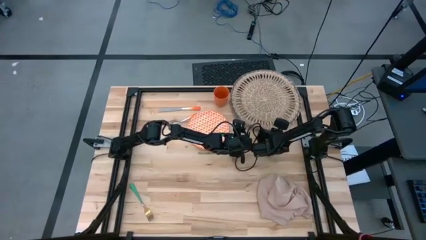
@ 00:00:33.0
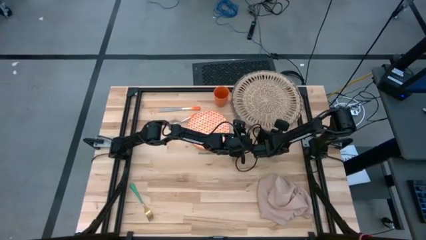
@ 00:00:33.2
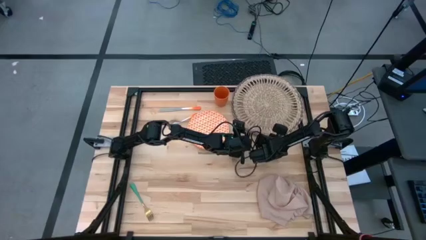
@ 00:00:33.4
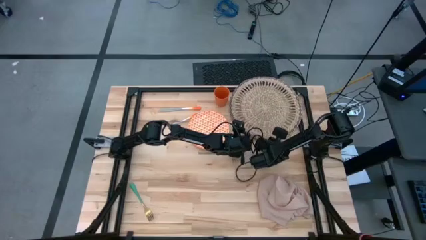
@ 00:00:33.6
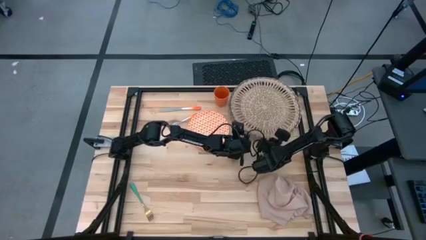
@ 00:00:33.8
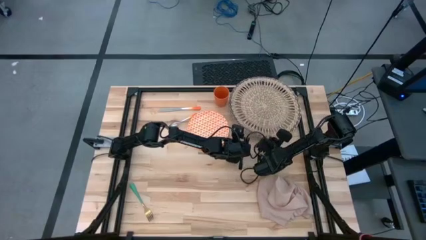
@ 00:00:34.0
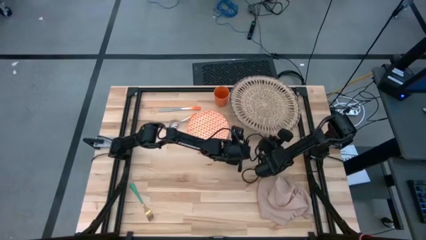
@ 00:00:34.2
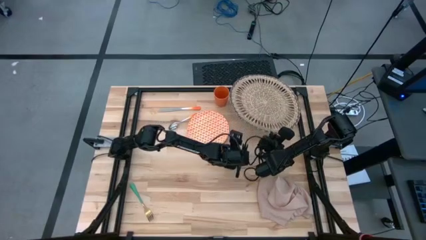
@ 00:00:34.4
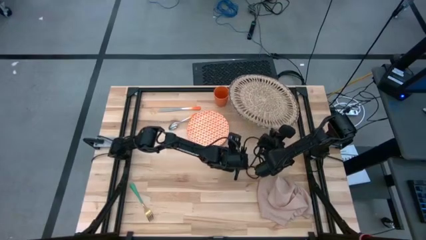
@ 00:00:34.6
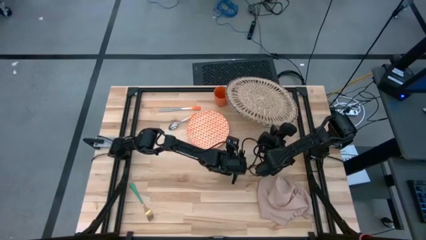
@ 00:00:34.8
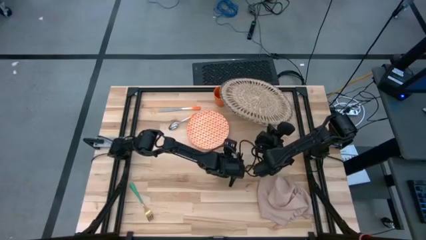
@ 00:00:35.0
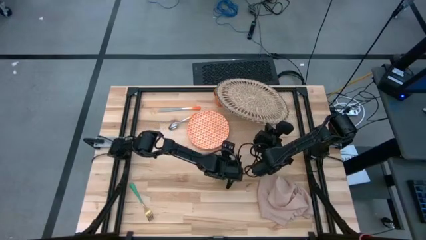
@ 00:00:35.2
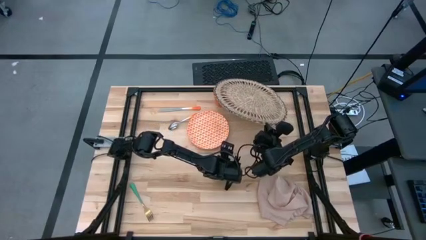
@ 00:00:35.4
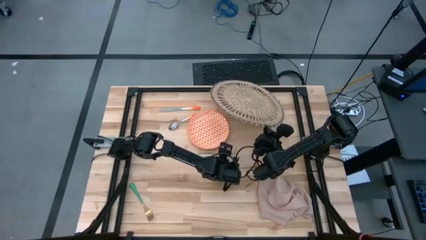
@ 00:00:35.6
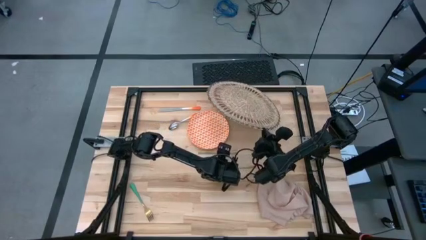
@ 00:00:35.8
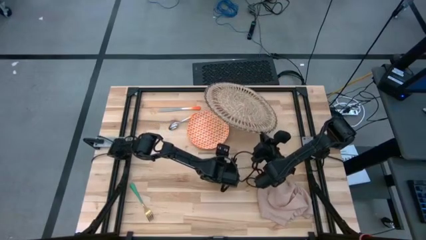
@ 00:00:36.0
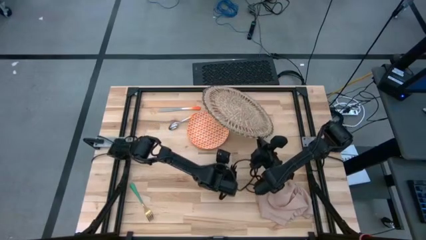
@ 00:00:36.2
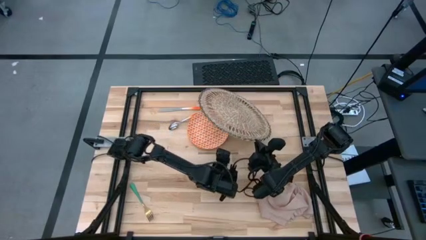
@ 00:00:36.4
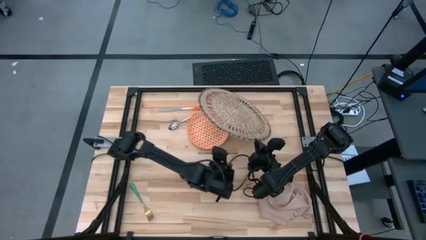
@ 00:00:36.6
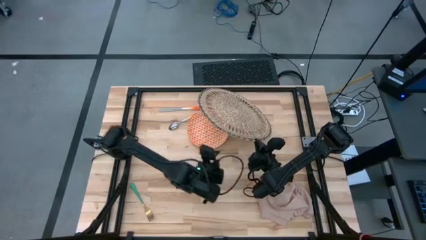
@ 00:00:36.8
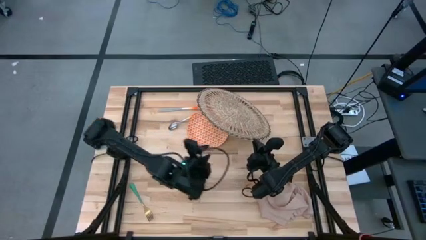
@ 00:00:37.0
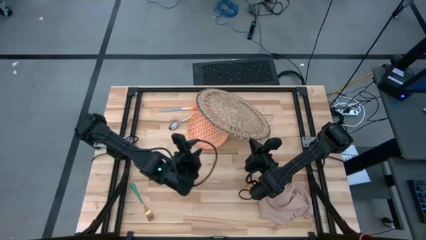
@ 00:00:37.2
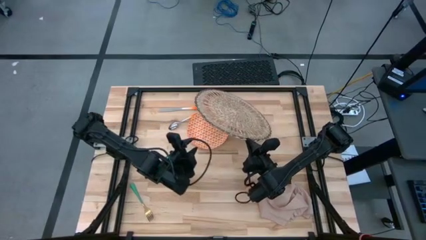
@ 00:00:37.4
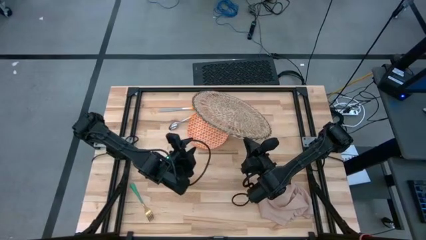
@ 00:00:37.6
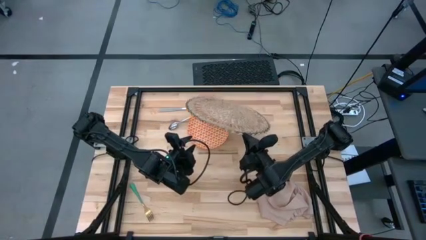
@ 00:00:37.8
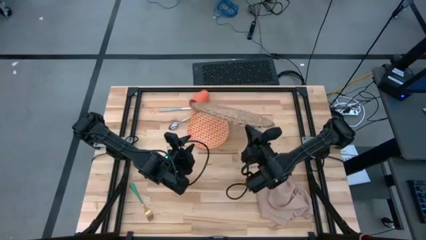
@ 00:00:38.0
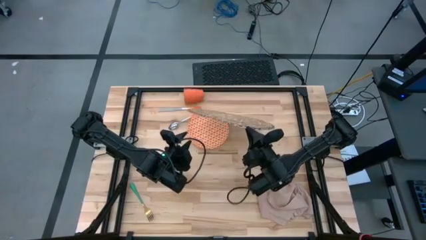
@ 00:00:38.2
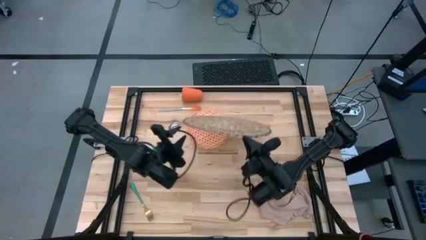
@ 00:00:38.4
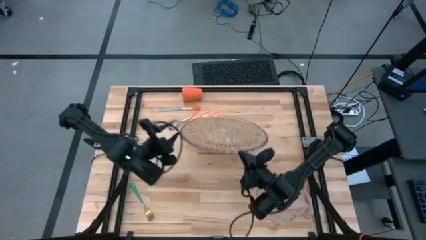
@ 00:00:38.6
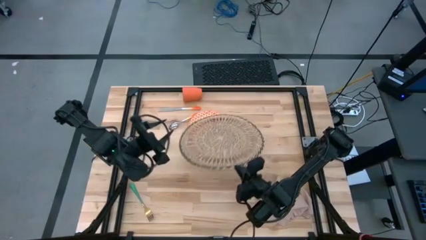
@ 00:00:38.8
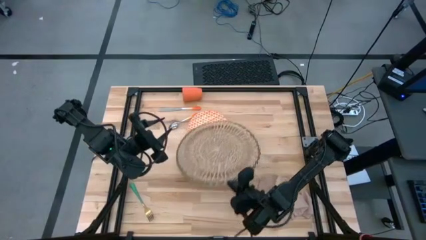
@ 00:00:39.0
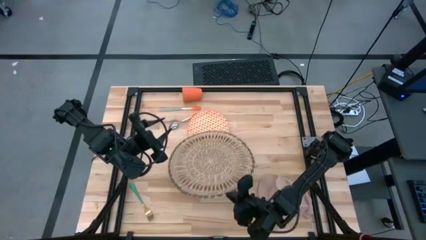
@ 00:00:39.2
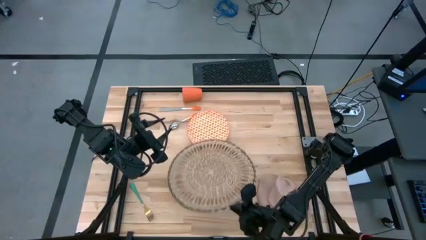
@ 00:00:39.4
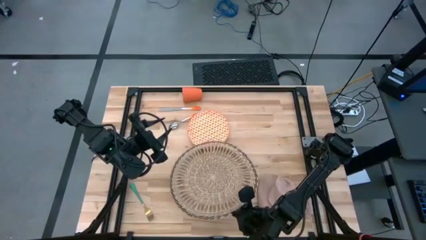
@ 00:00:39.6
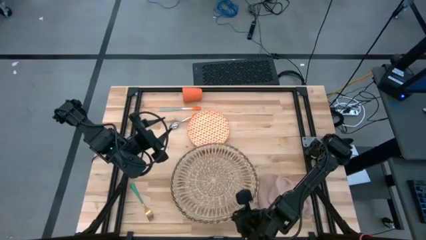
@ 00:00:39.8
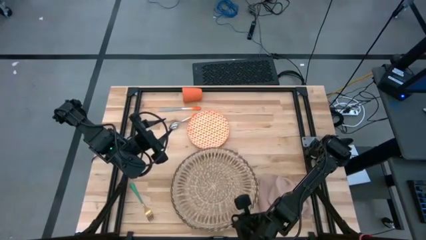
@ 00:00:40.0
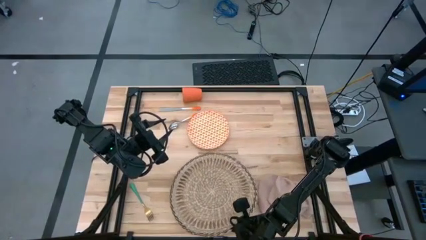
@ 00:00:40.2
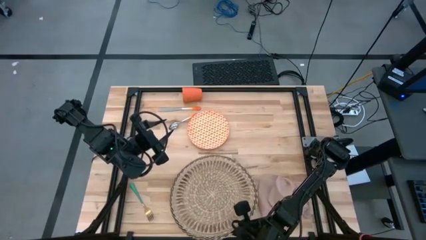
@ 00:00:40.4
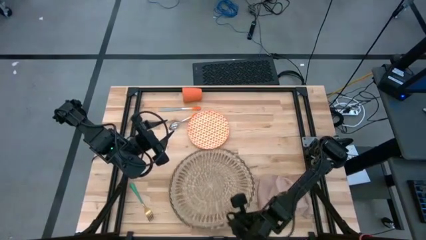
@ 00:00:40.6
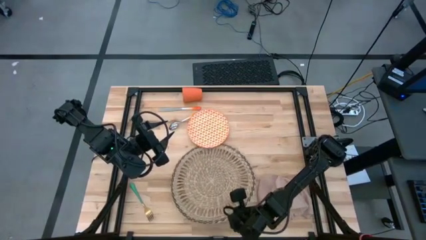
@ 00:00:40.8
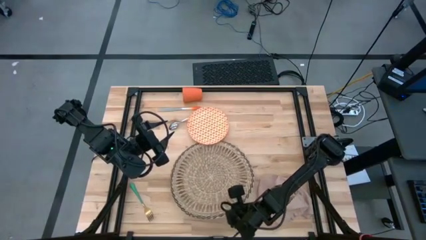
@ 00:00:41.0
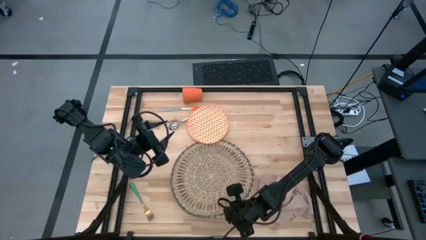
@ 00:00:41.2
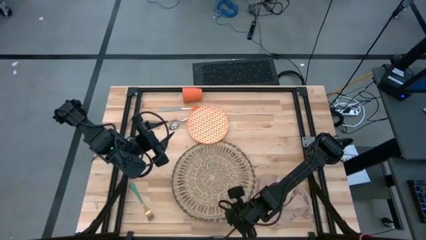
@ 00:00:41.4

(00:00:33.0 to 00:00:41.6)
Task: Set table place
Move the mat to the center of the table

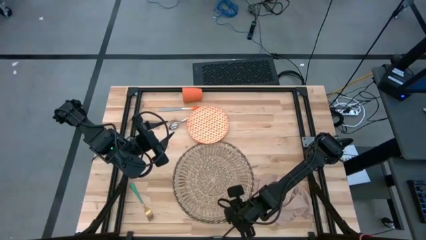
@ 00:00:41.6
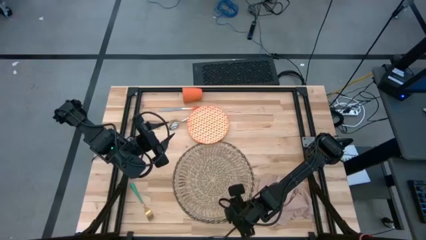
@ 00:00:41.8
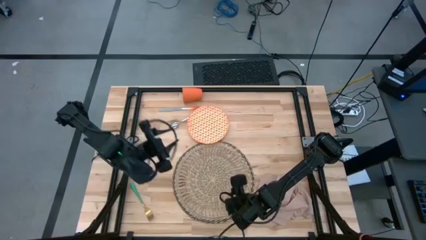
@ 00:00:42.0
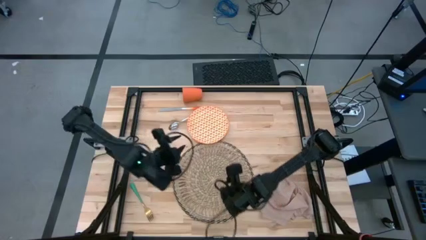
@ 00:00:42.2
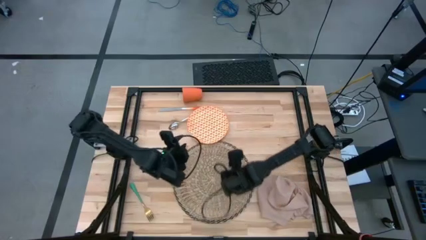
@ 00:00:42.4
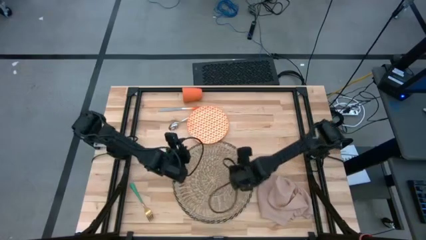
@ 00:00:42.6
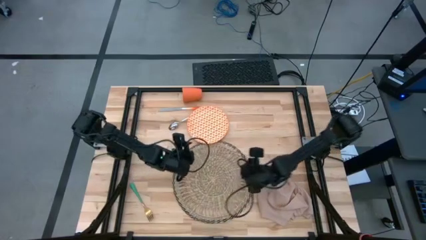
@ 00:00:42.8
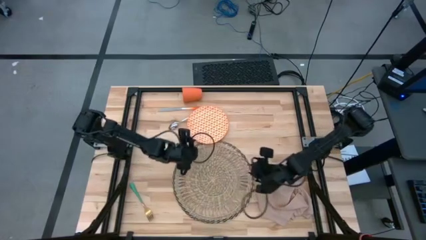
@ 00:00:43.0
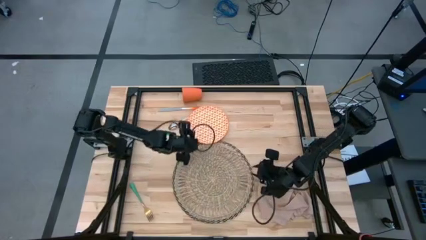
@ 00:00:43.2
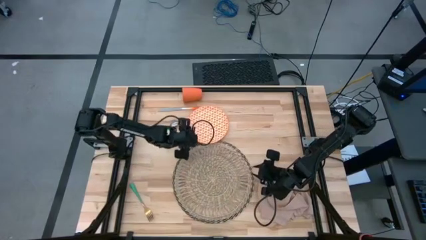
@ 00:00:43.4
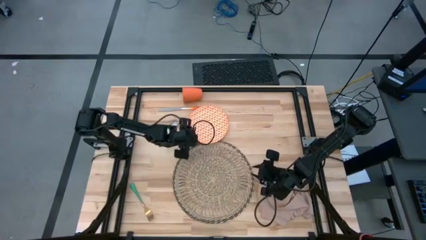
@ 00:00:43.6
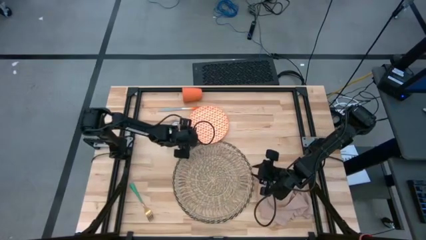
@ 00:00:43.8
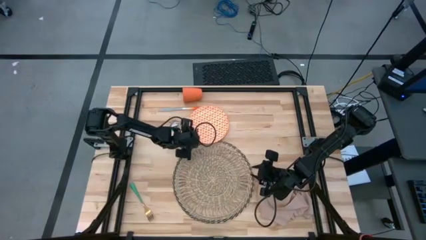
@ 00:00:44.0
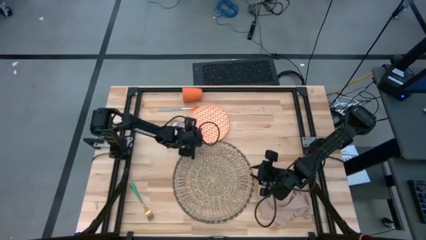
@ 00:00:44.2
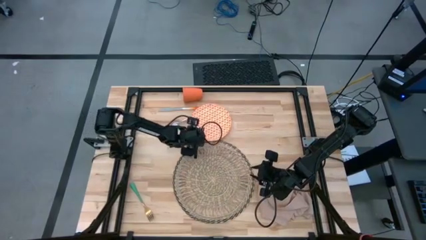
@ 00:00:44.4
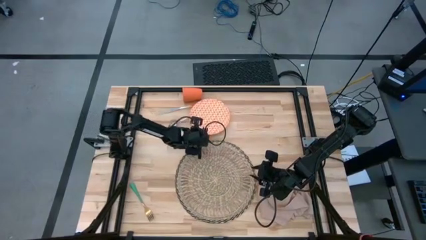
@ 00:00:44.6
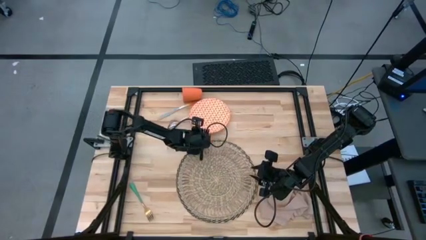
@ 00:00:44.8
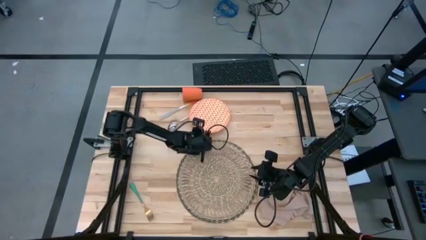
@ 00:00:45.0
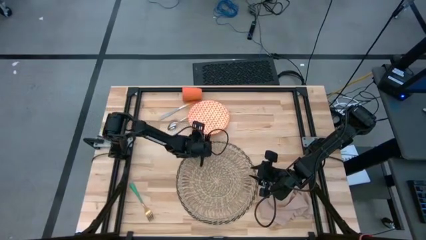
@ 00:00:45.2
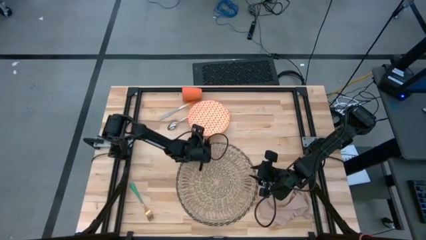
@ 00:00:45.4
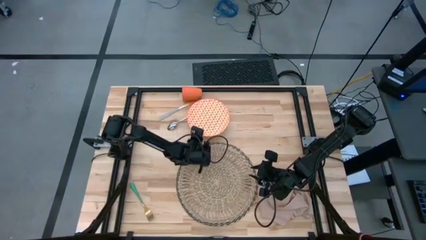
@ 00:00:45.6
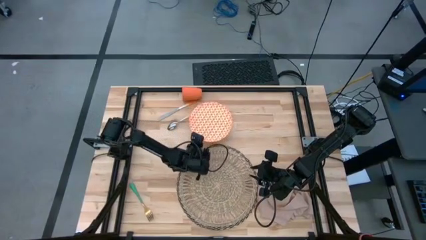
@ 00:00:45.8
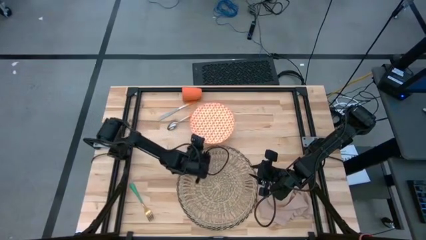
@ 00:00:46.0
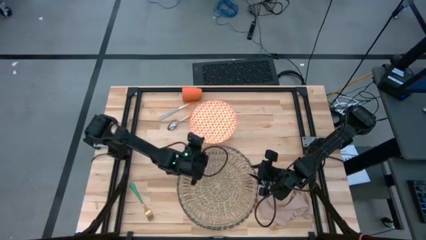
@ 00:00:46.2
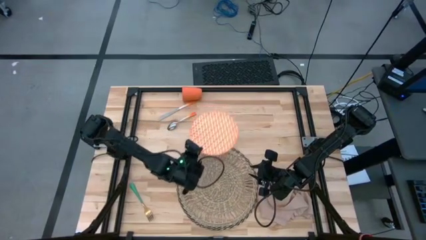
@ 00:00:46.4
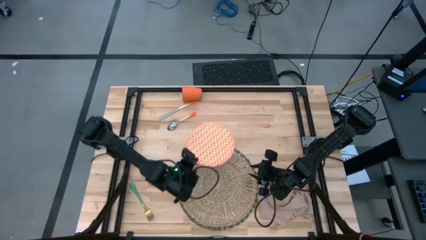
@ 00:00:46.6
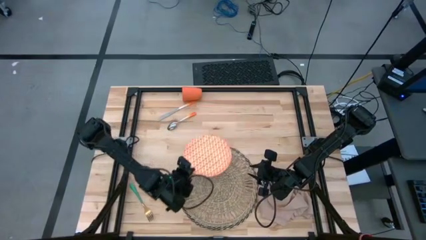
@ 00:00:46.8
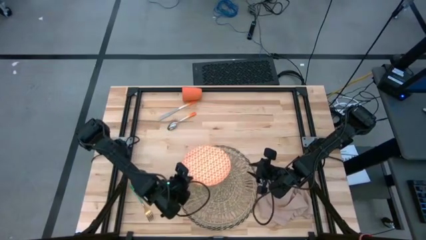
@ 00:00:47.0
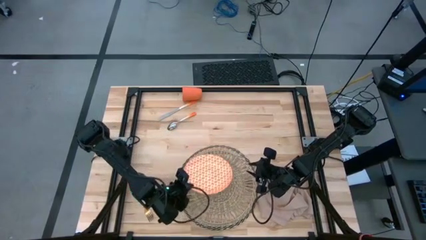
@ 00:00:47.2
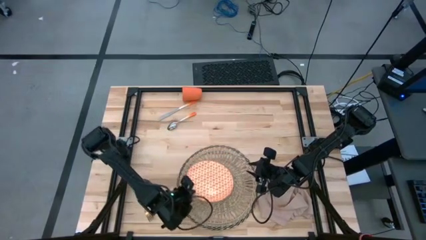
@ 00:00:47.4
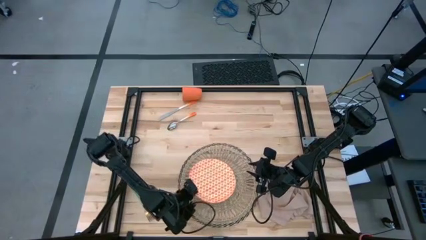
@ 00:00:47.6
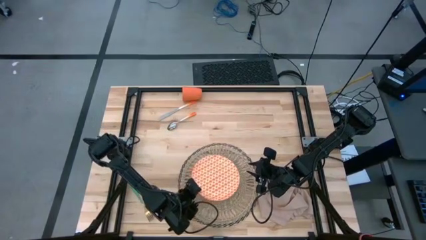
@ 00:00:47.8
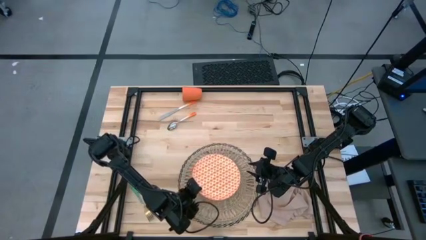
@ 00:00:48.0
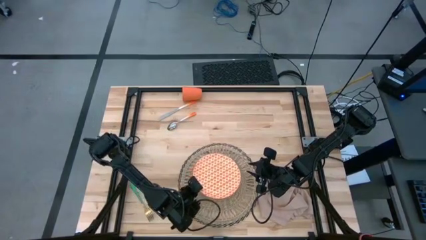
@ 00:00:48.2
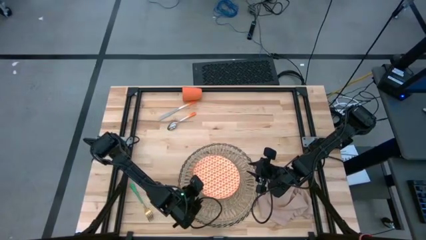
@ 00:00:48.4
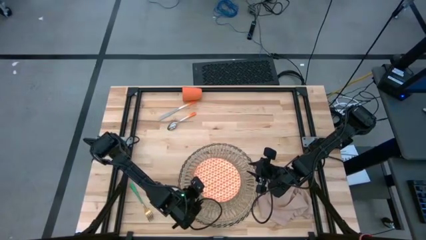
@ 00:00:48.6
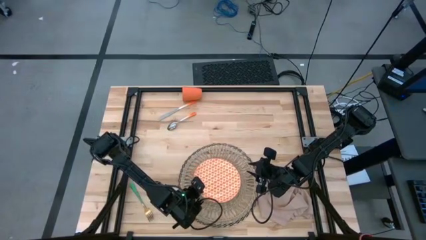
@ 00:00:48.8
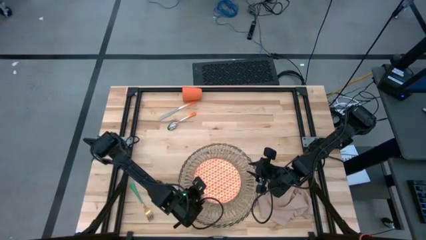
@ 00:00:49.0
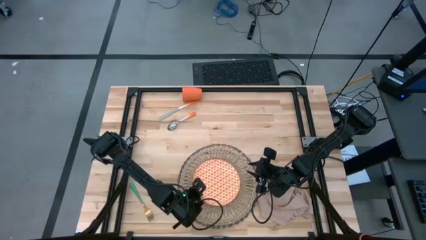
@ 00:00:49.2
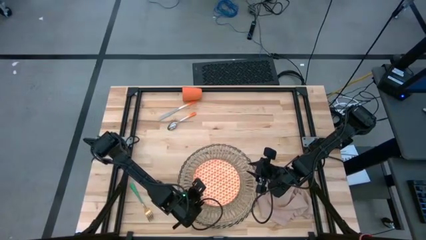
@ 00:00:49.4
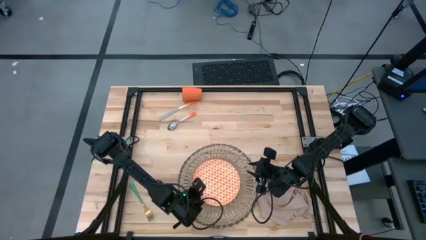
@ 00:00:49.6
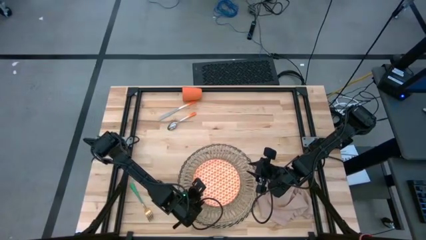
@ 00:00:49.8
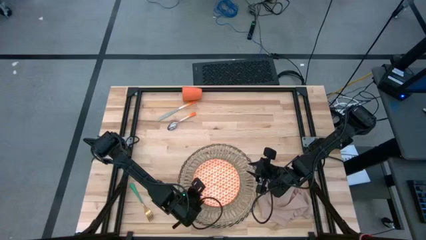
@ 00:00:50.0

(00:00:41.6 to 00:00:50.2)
Put the patterned orange plate on the mat
